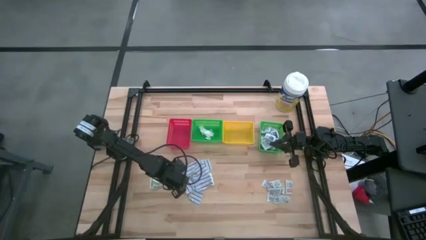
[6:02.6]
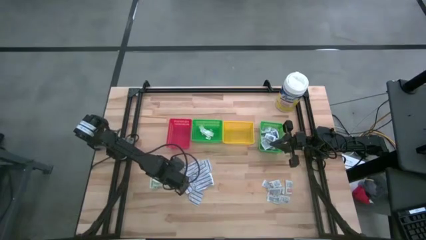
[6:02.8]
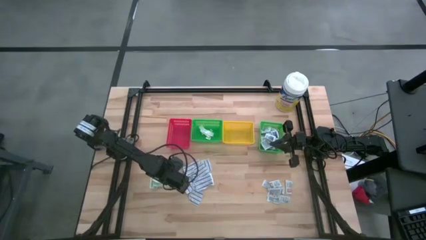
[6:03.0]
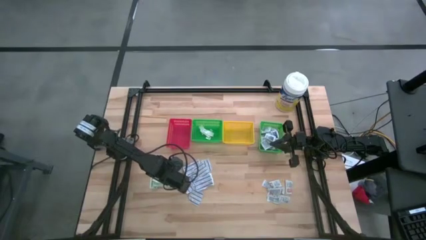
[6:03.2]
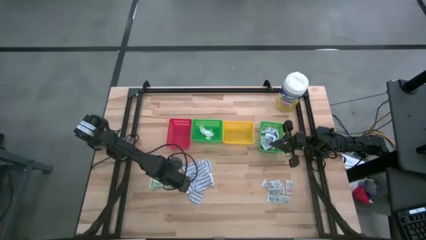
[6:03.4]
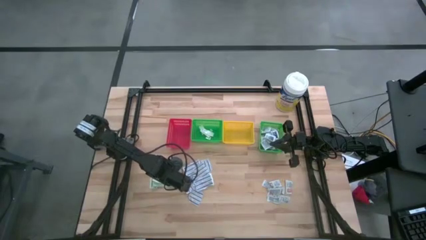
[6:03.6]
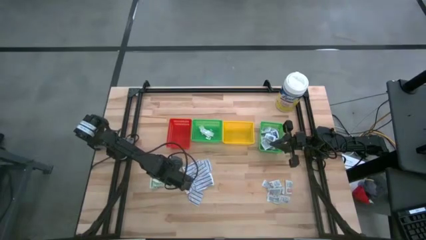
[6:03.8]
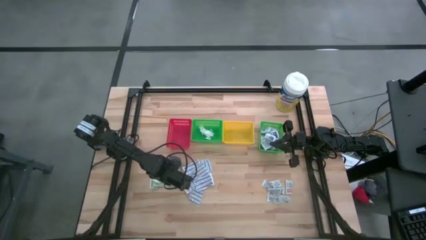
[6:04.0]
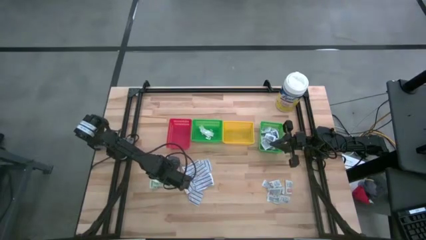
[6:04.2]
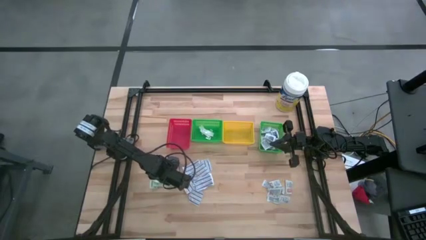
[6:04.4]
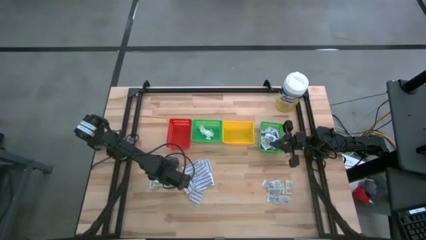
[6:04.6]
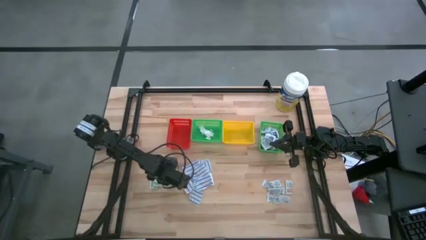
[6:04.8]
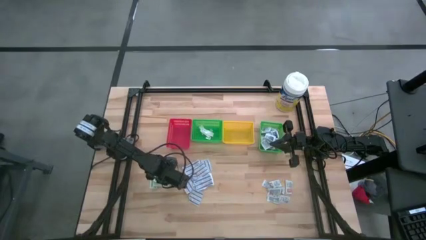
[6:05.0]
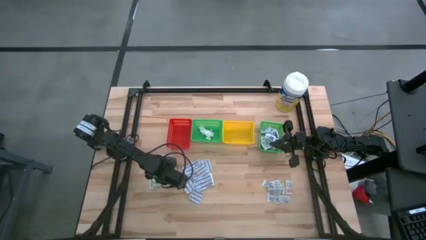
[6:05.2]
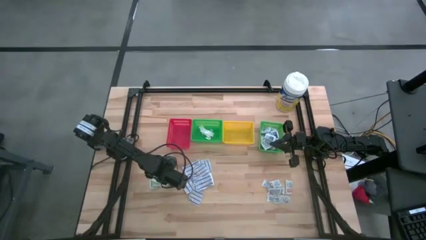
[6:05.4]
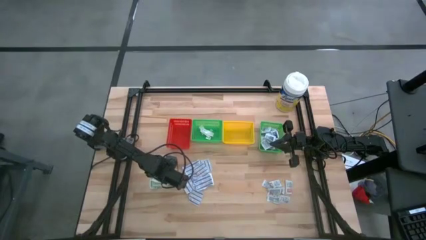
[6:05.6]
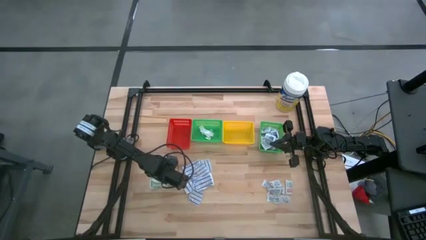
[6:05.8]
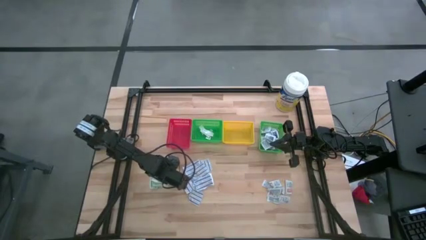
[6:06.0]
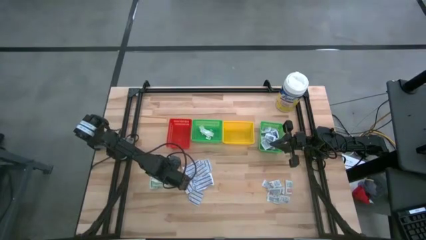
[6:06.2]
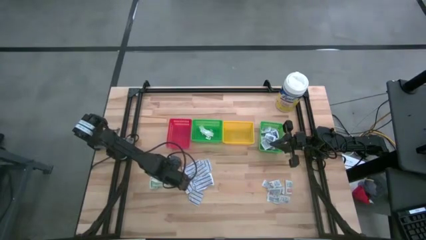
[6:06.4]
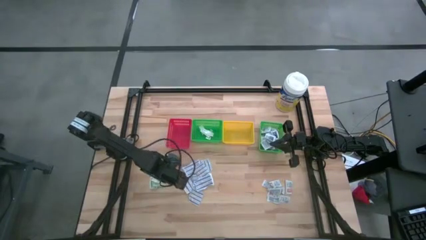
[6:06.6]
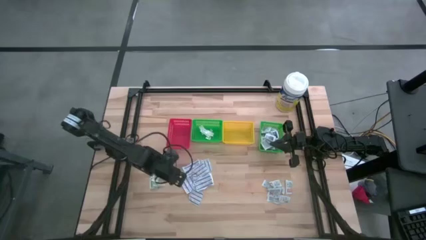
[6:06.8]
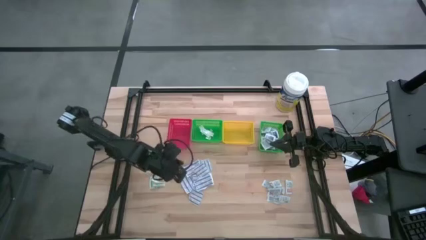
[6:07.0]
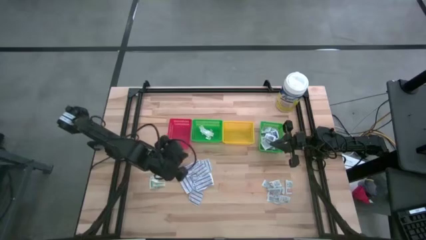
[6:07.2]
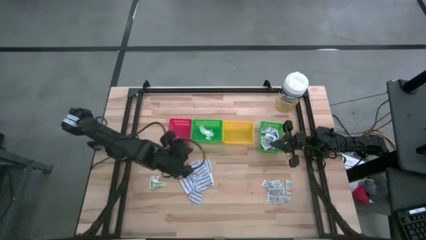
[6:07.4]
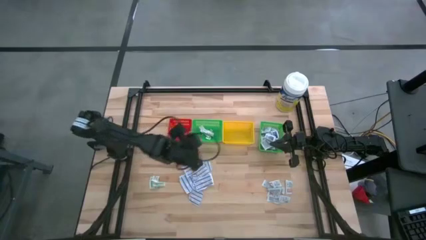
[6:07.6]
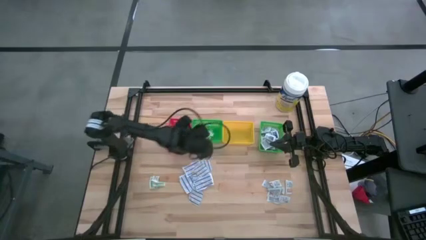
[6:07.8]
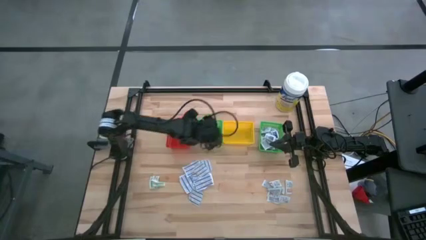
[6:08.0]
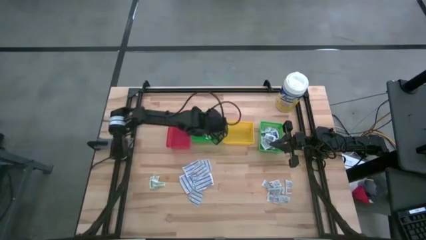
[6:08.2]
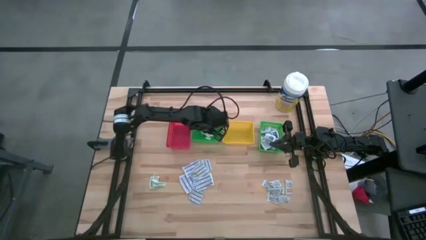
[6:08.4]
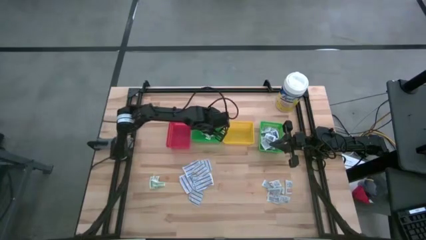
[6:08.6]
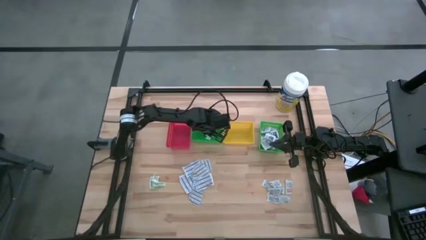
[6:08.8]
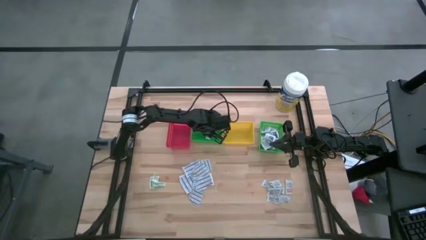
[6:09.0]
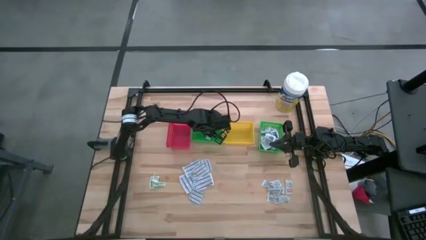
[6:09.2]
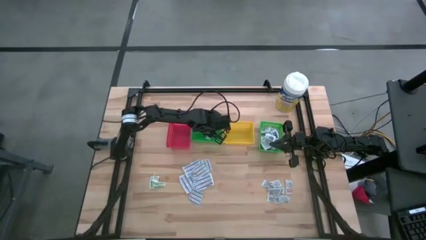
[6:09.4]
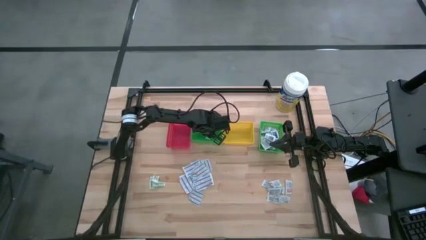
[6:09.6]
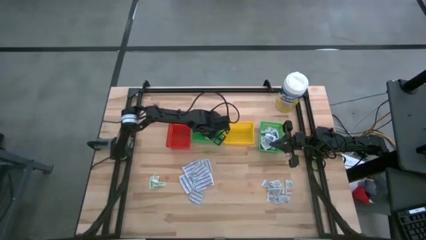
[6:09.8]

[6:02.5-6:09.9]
Task: Pick & Place First Aid Supplies
Put the green bandage into the left green bin

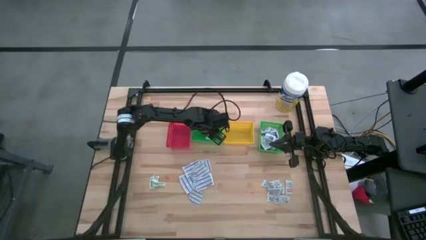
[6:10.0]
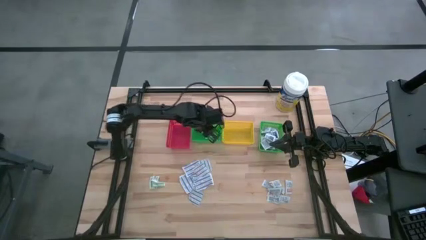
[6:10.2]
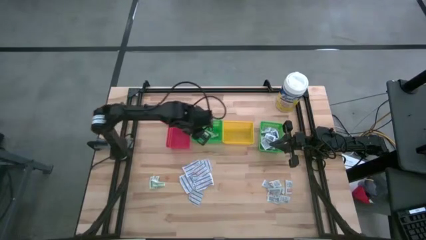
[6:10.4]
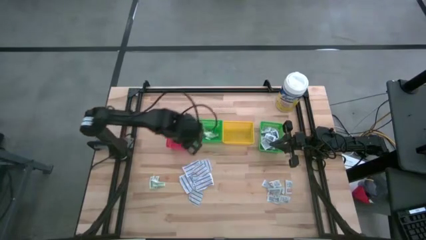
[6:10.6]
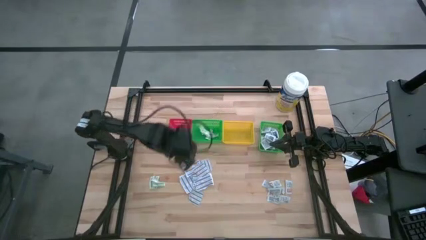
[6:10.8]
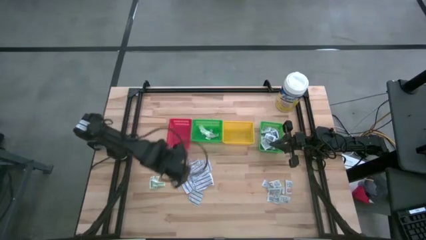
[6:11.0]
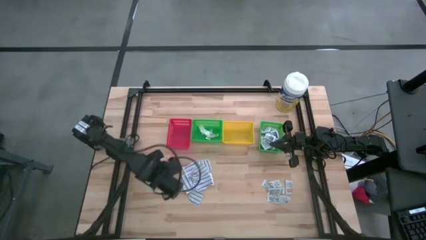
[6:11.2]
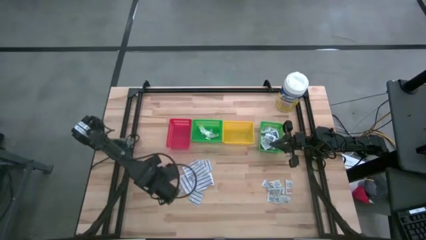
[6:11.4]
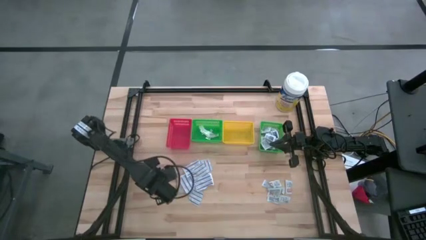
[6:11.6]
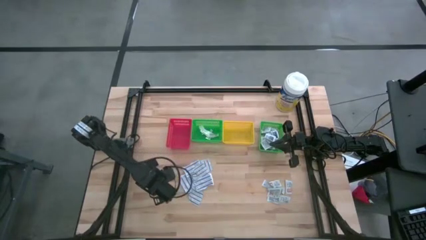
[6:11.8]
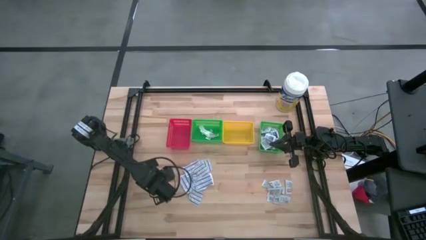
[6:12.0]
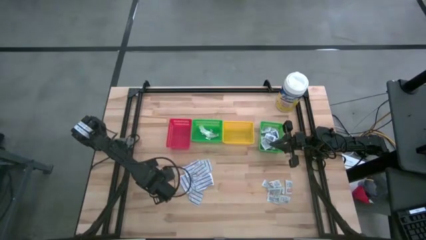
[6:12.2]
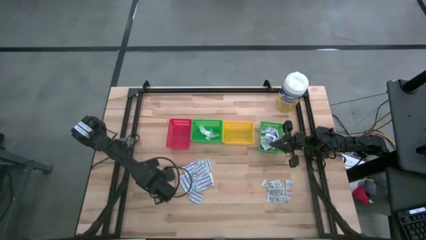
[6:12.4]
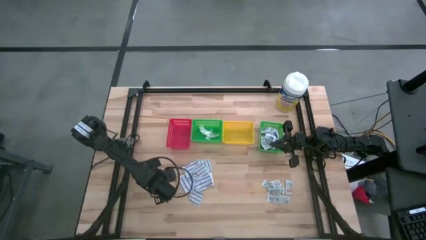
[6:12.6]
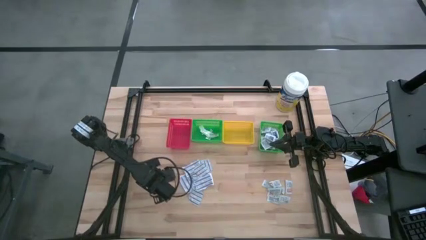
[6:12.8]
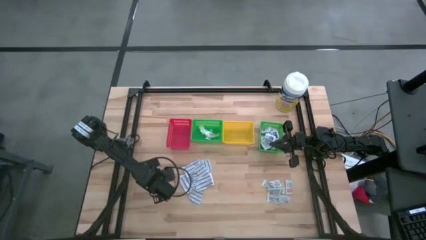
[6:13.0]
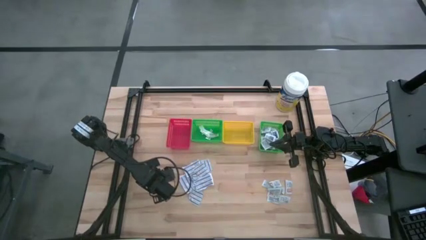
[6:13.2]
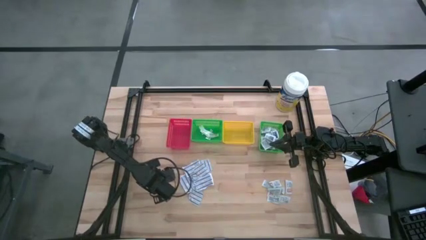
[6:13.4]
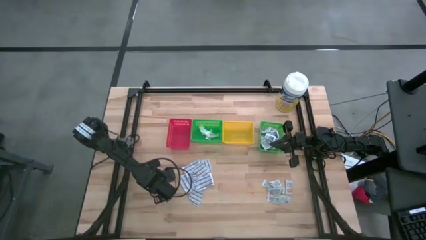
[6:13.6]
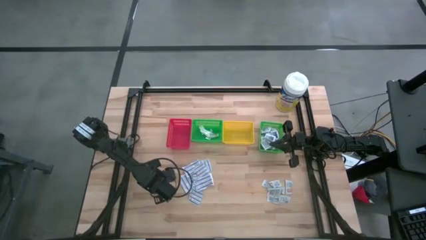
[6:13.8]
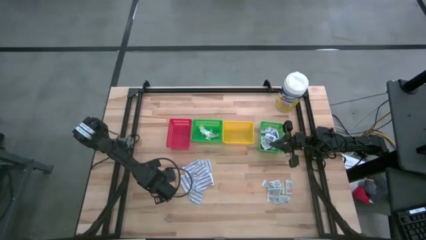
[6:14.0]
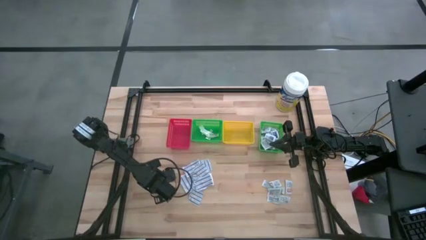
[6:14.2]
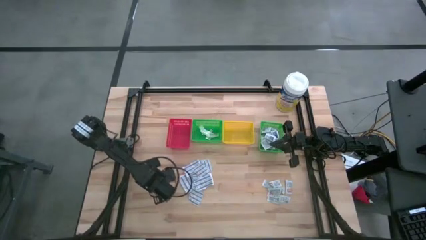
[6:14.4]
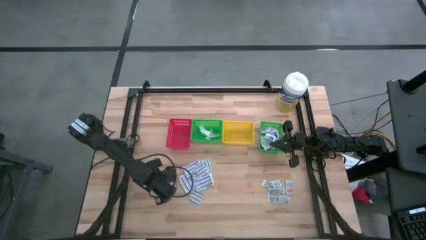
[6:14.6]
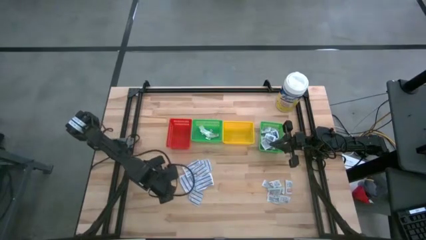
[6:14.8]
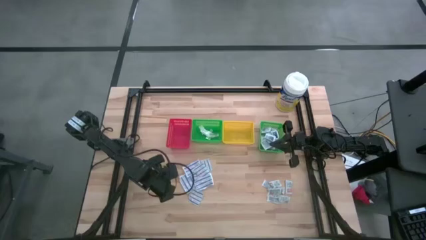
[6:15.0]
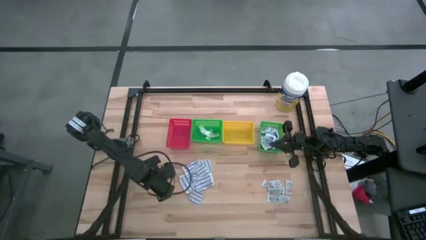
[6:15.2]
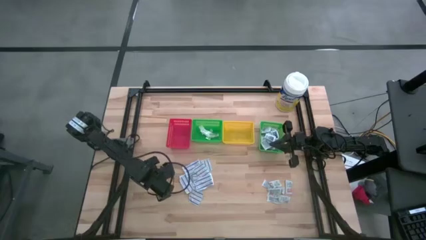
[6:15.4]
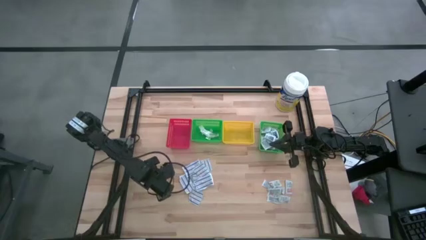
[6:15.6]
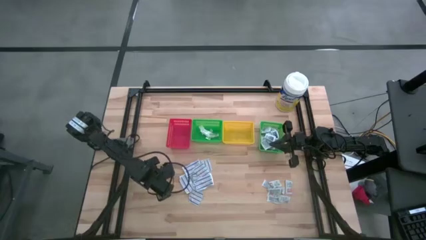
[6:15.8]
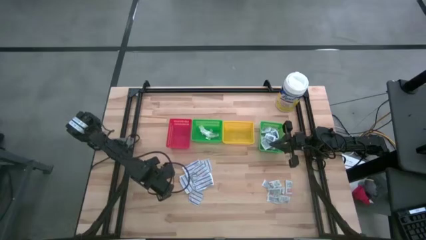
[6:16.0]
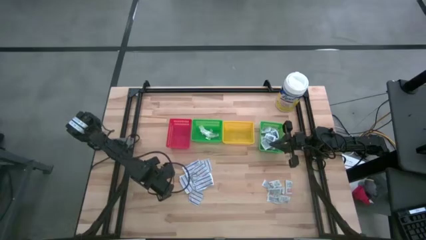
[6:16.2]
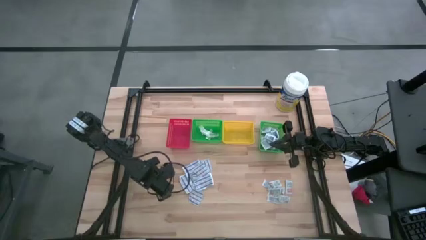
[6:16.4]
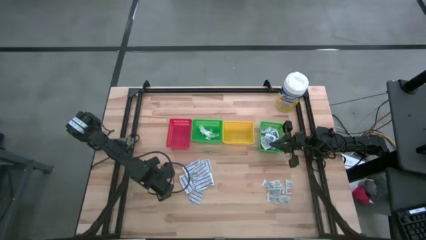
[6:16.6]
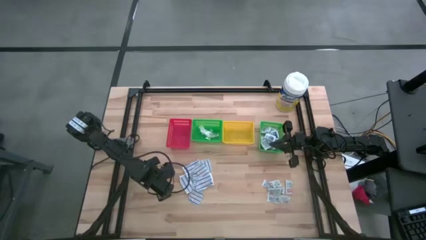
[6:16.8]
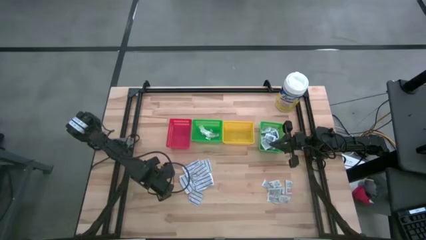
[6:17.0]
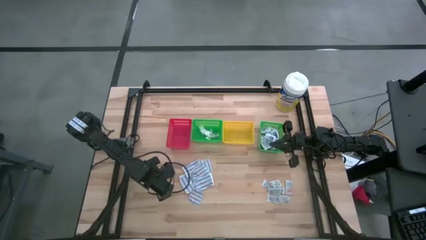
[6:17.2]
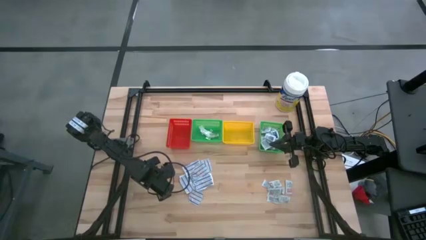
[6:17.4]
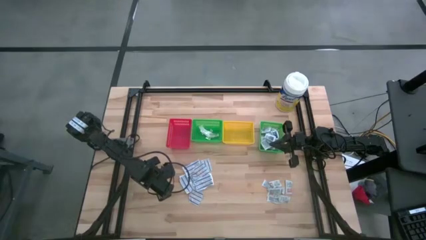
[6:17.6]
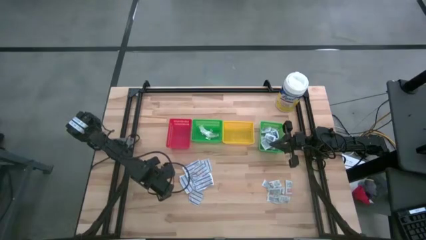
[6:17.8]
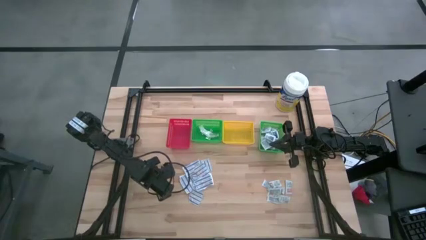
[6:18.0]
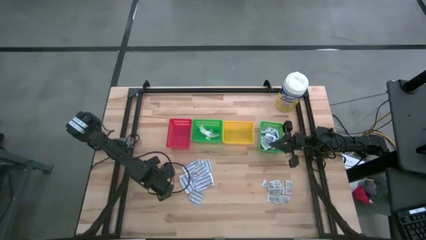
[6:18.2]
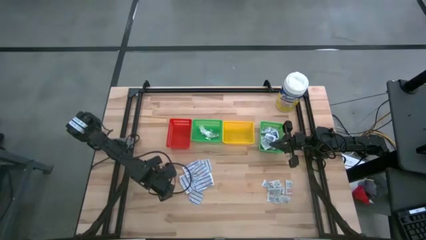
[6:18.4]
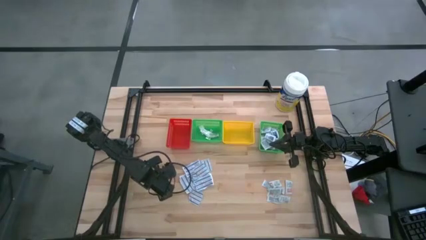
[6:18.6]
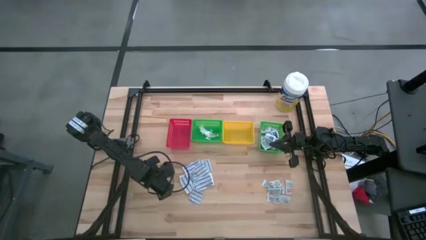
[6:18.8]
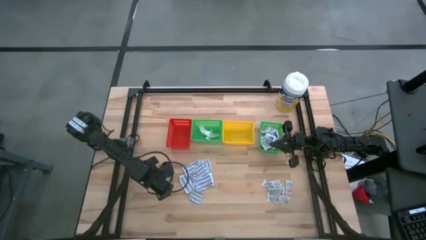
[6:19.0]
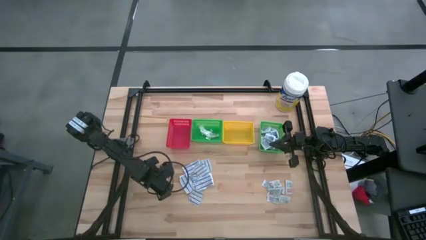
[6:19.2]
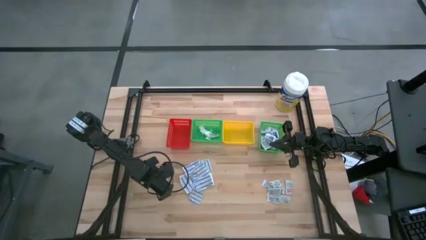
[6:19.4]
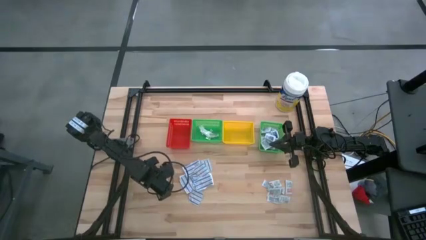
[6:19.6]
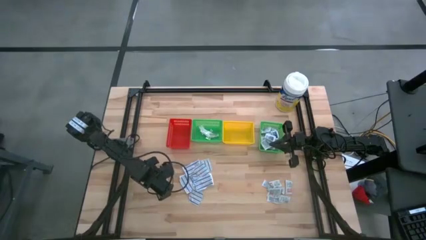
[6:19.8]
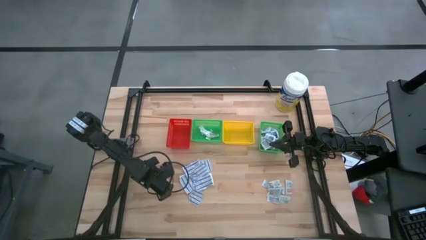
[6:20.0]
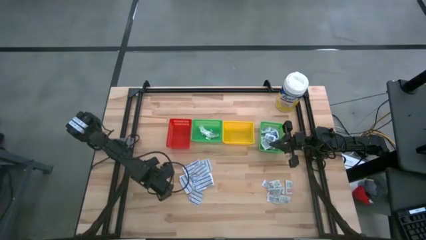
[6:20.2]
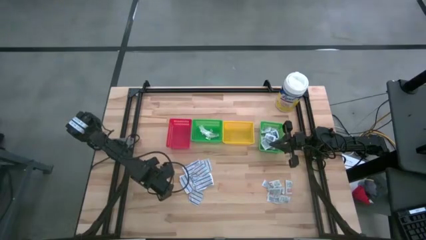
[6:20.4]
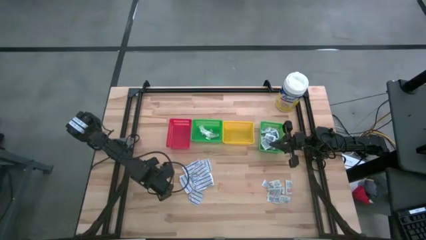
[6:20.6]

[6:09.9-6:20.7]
Put the green bandage into the left green bin
